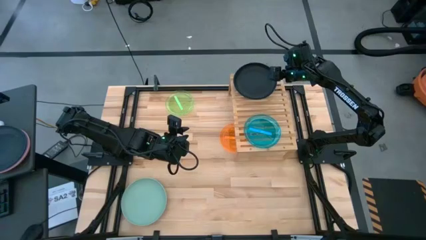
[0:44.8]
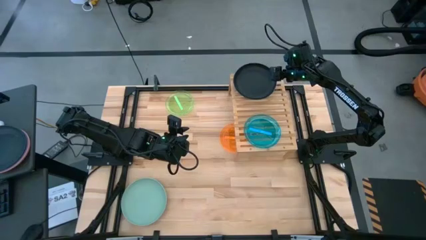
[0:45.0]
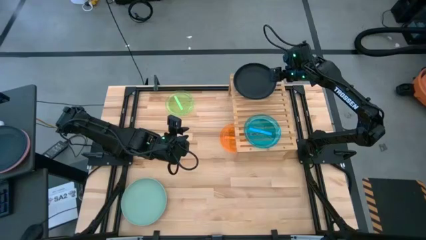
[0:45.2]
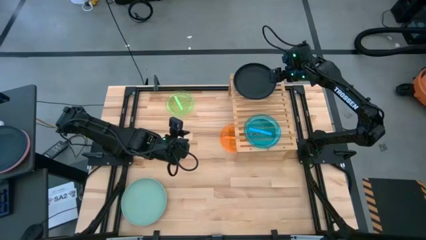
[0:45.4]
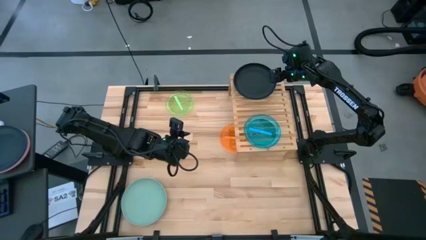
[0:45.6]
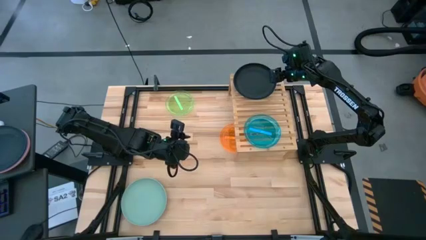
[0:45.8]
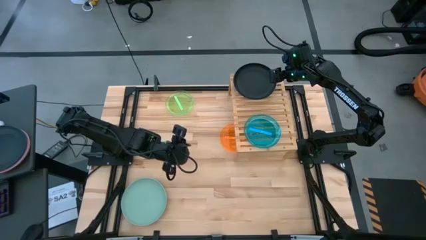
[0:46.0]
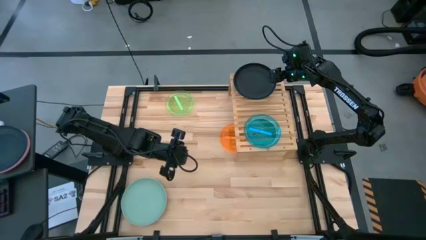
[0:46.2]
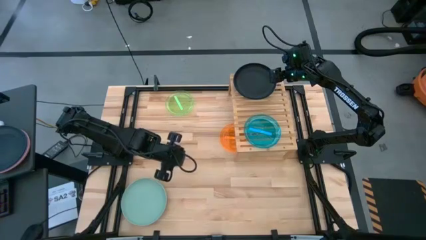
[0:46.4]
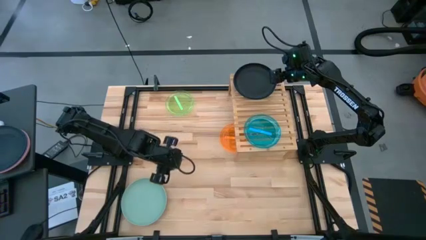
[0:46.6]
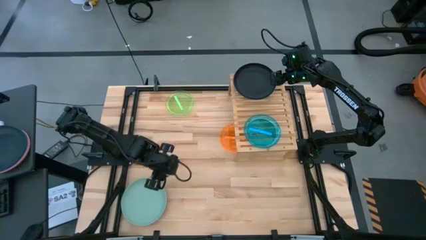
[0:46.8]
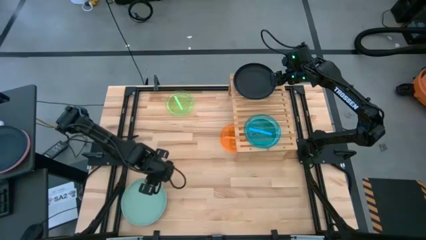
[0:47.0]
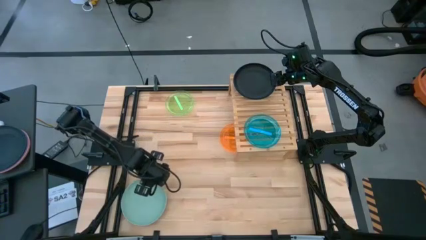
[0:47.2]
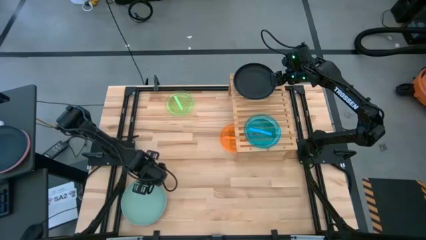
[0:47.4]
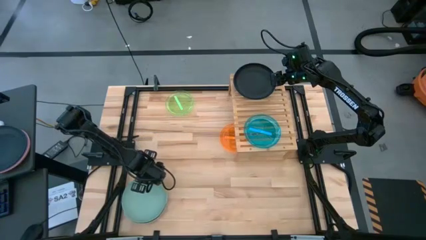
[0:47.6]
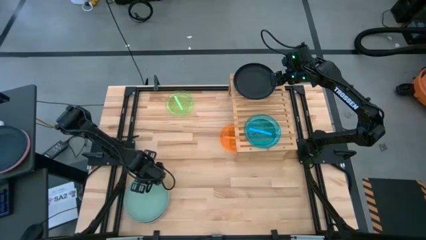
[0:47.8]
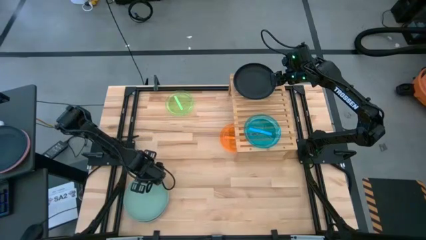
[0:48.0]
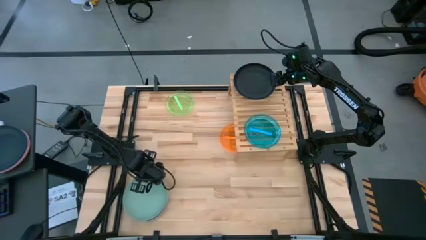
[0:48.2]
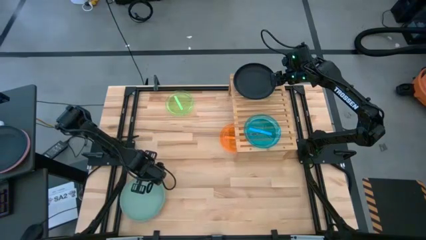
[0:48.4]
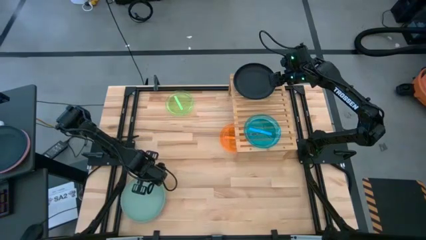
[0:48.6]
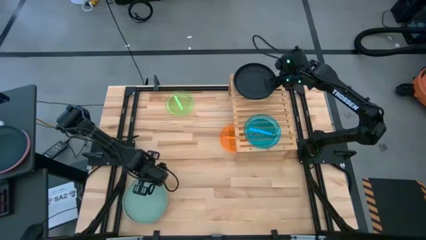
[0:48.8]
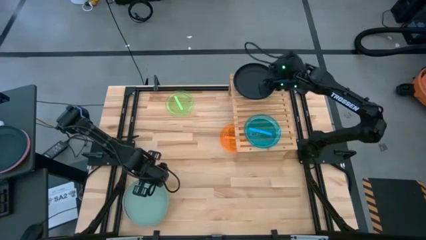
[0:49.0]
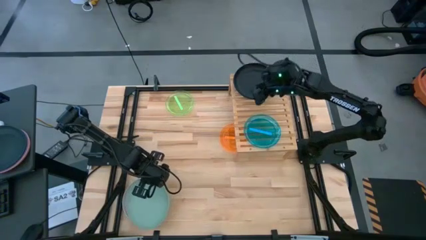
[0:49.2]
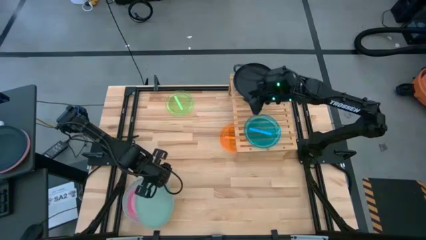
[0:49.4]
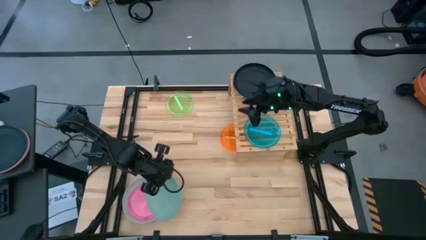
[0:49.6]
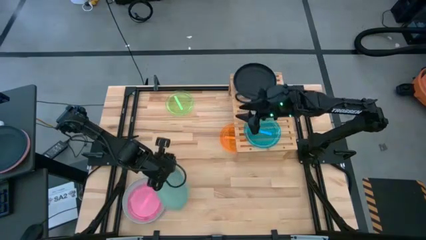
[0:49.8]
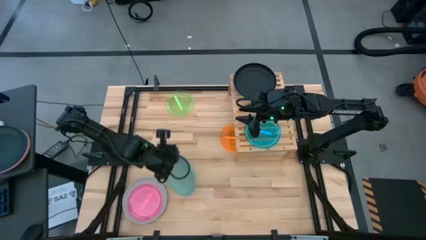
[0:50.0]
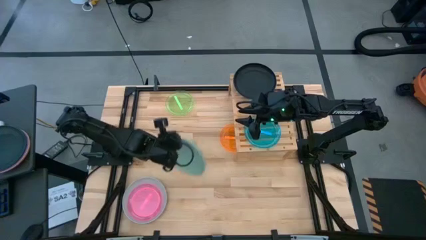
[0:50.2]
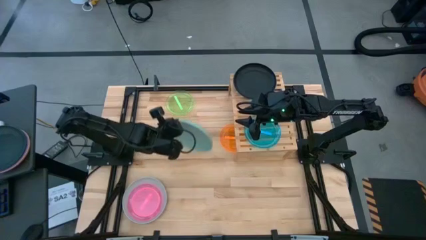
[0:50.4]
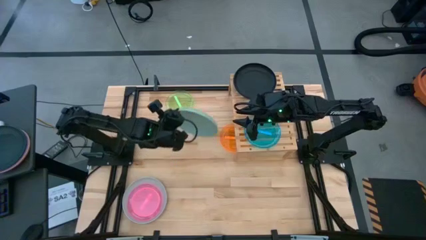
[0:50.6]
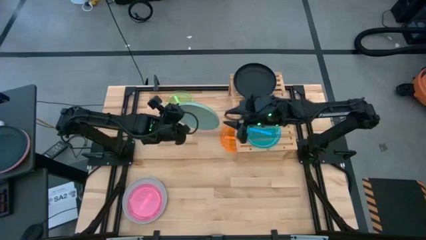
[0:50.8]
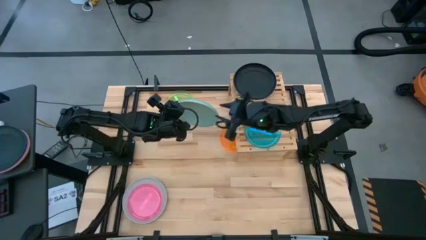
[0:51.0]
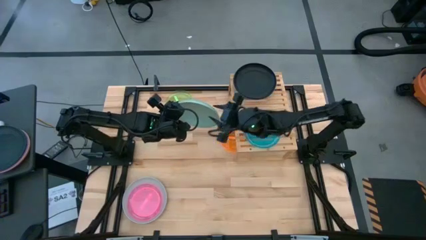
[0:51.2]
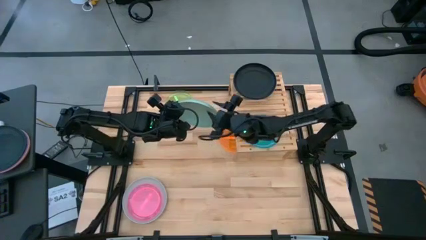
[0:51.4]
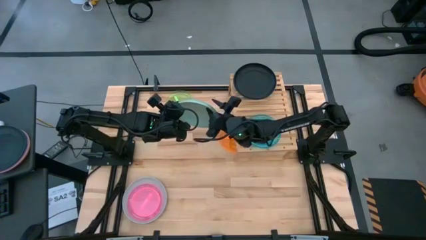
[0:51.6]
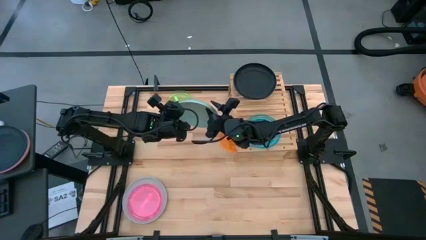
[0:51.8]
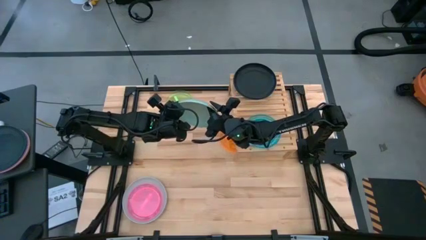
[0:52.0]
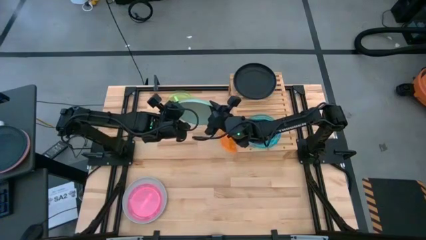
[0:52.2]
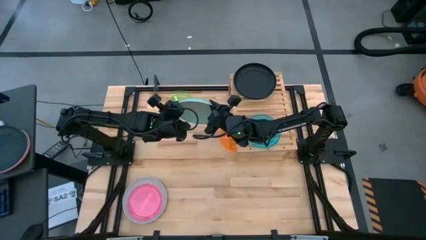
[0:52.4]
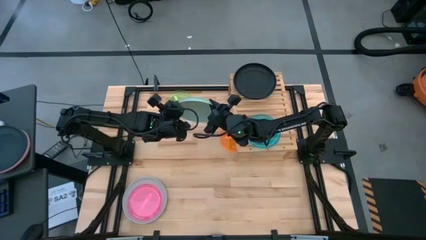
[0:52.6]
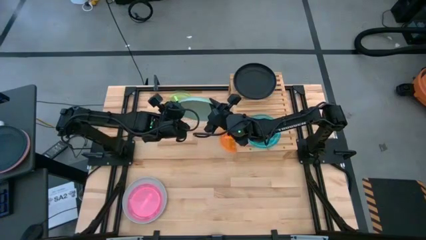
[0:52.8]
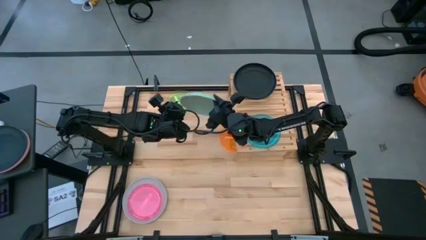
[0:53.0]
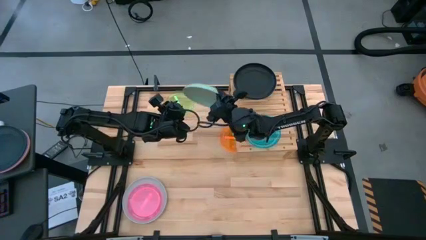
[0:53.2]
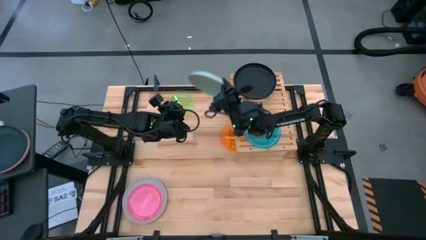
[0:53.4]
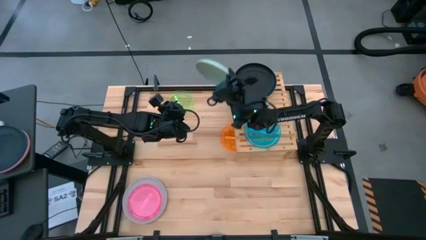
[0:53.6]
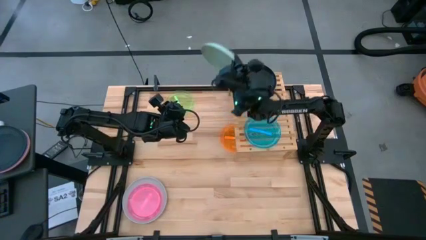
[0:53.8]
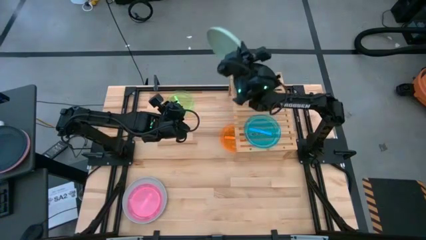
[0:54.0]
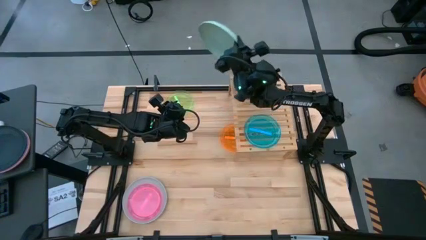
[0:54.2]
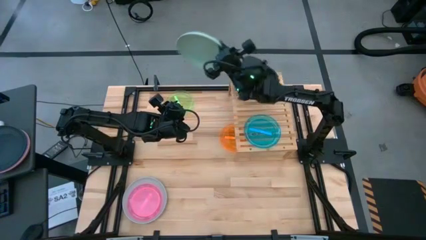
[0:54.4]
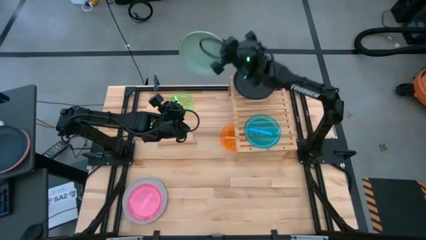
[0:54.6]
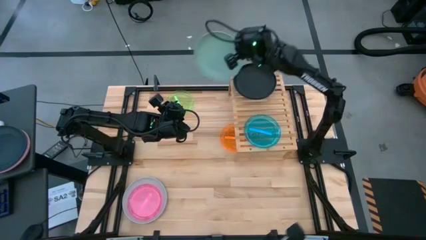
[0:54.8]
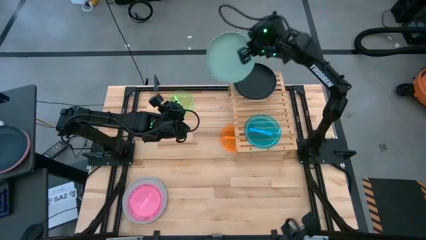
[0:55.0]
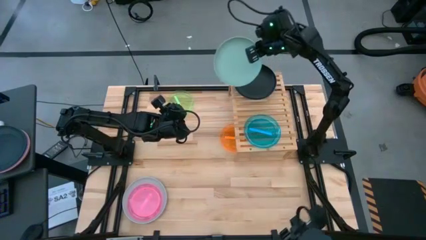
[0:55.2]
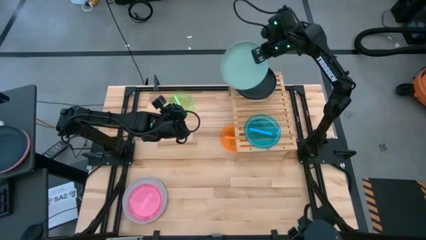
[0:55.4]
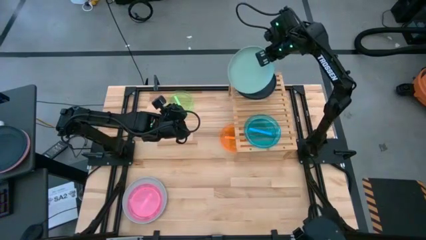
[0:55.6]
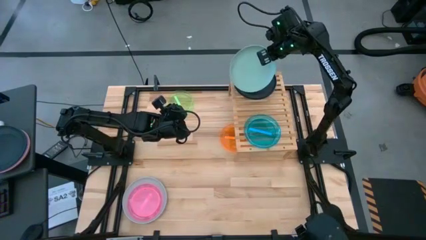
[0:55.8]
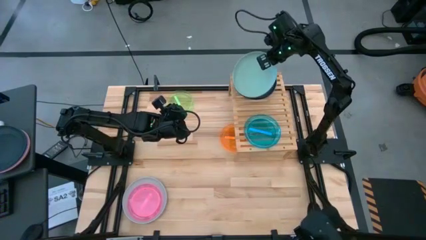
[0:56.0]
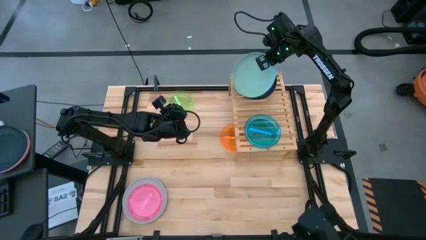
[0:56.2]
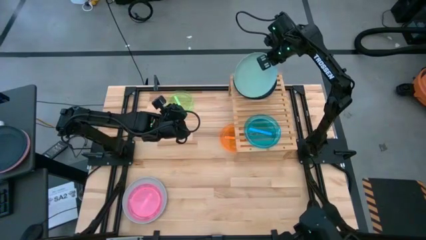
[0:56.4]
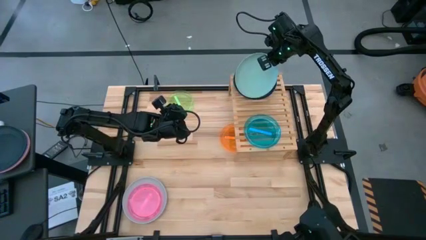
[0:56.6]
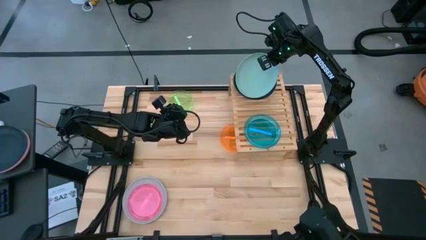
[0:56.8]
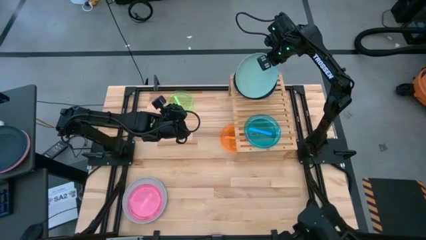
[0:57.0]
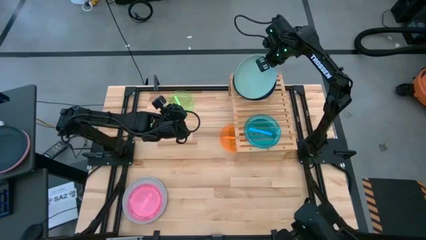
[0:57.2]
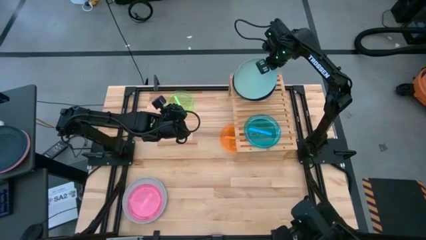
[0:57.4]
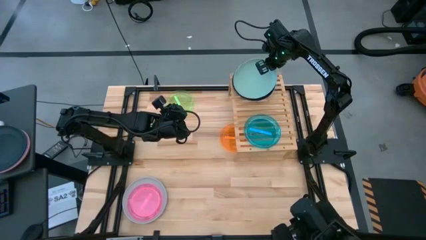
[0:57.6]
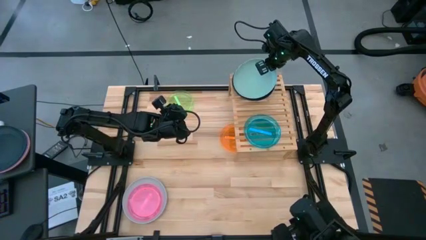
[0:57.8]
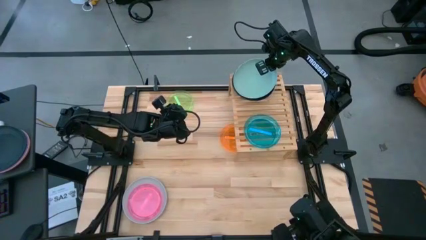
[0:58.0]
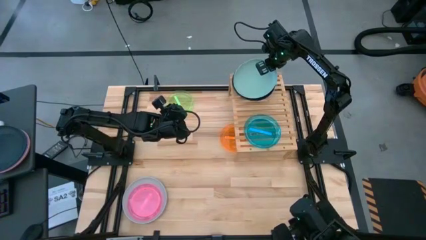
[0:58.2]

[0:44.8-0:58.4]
Task: Place and stack plates onto a shelf
Stack the green plate on top of the black plate on the shelf
